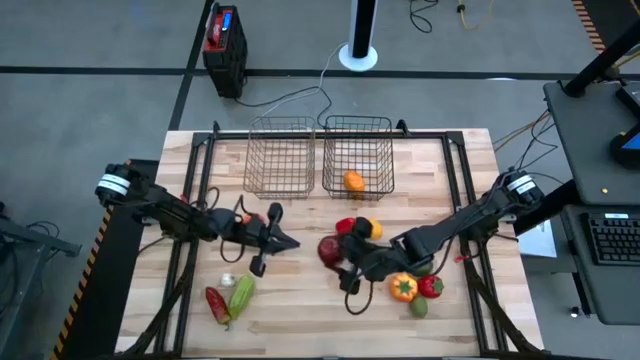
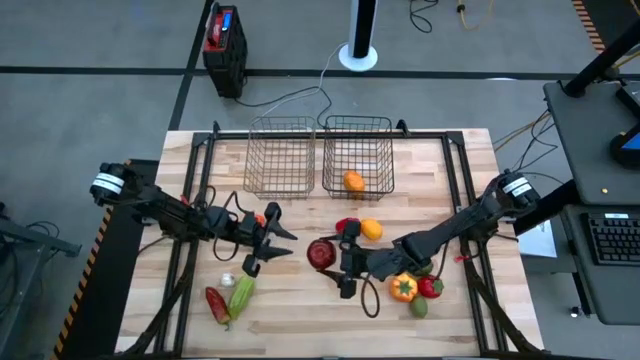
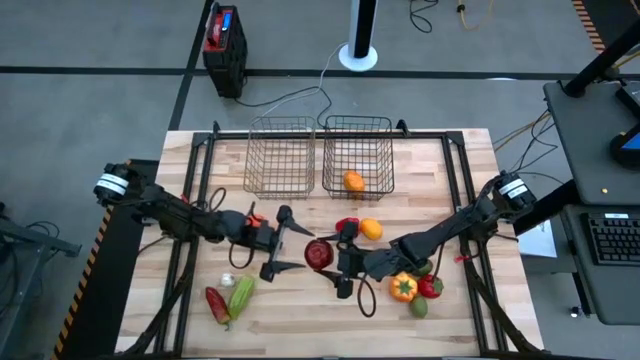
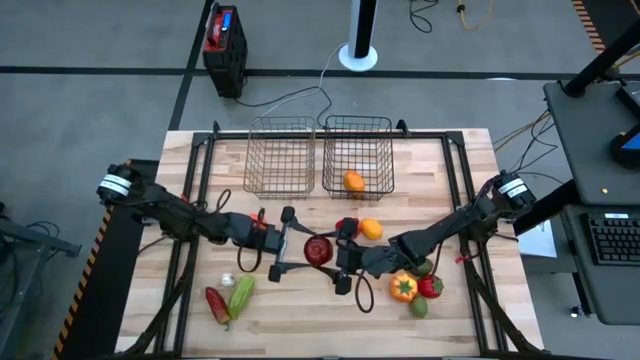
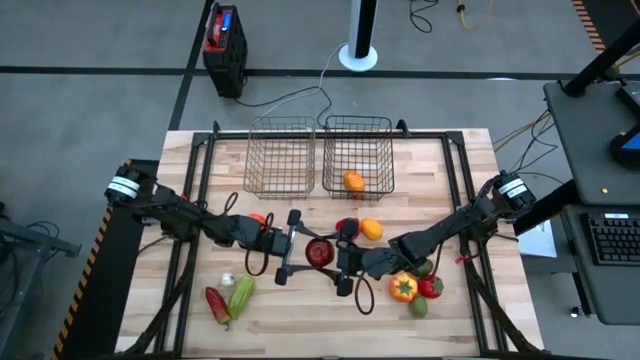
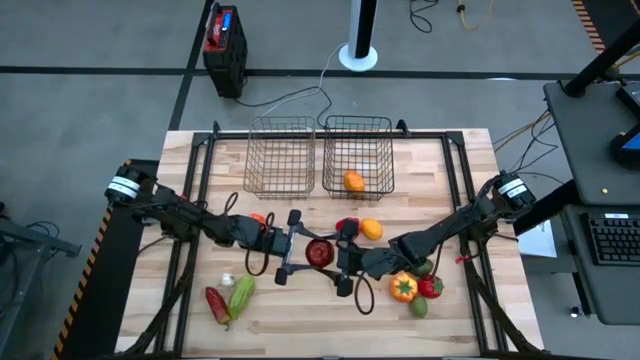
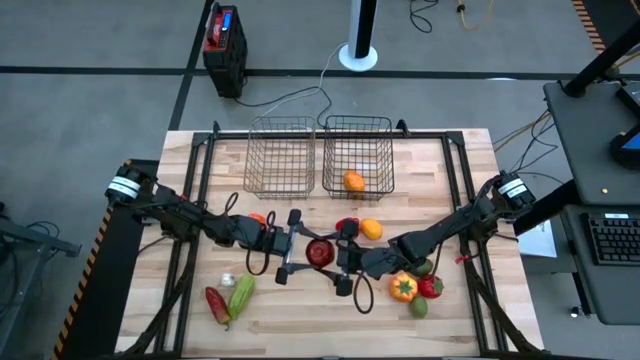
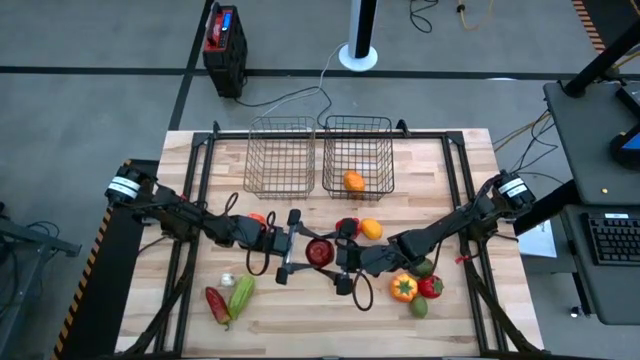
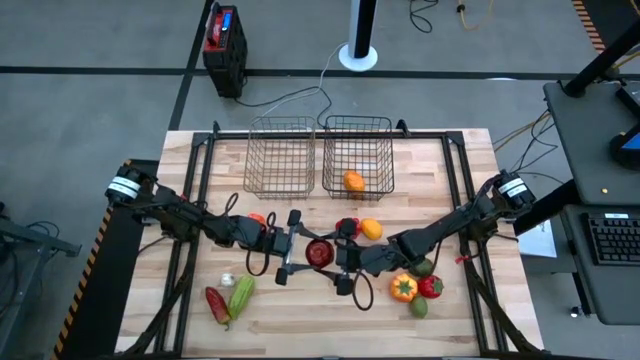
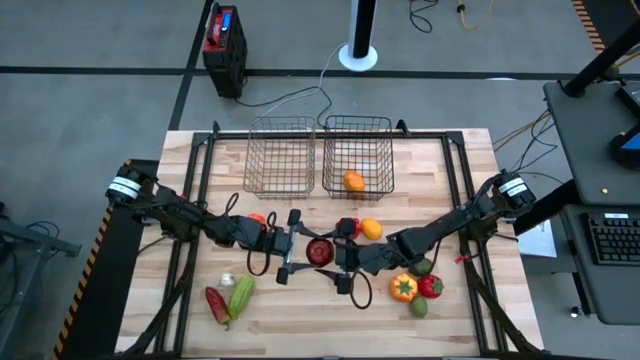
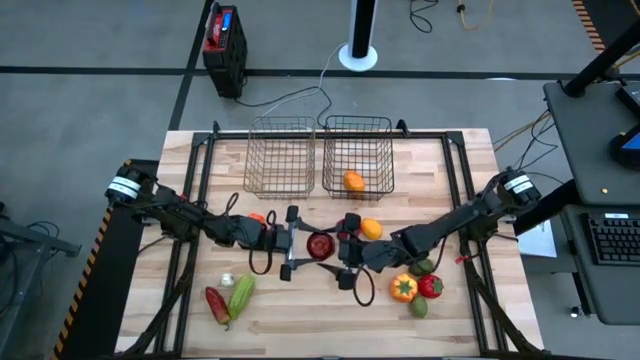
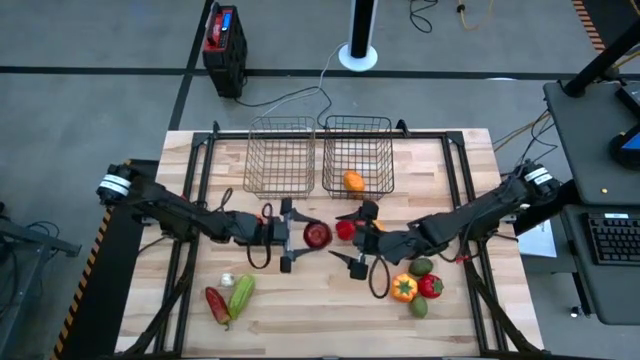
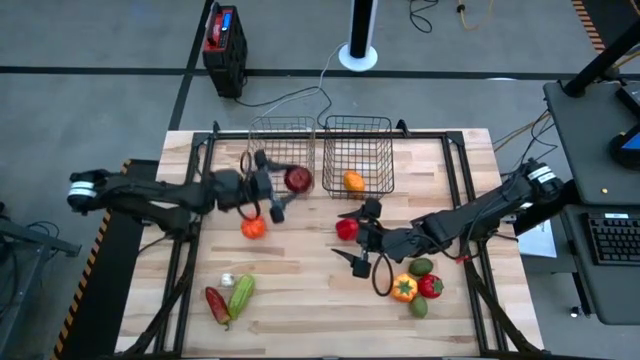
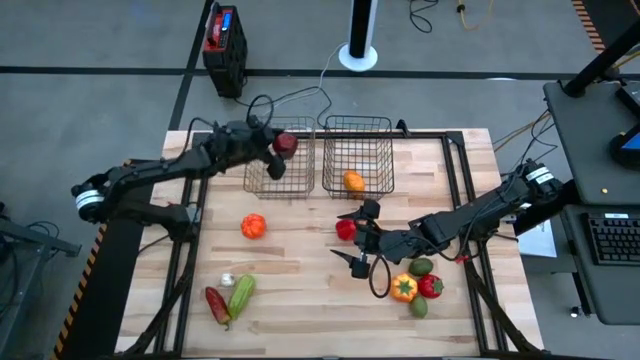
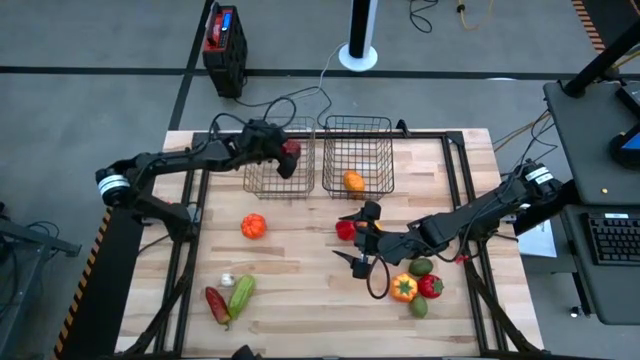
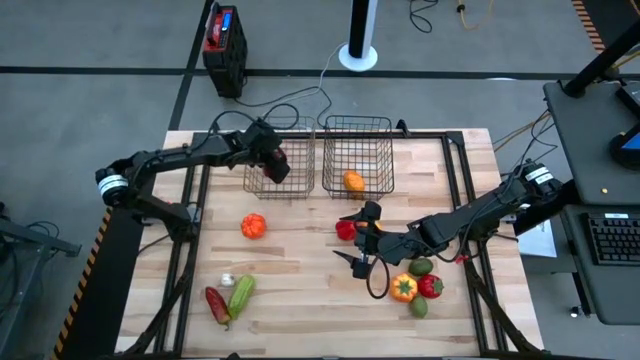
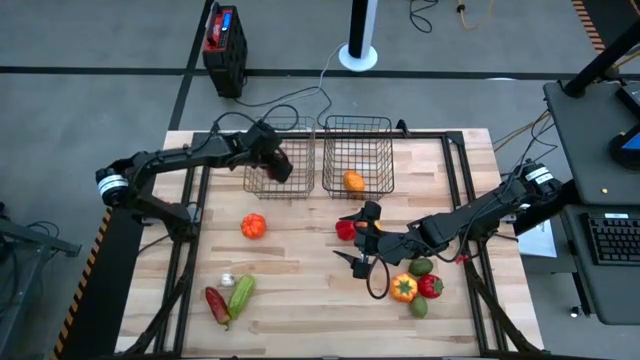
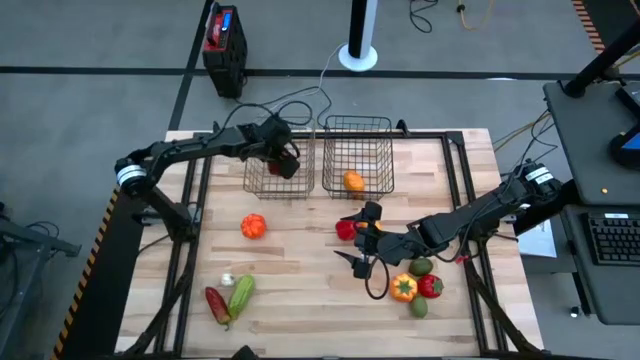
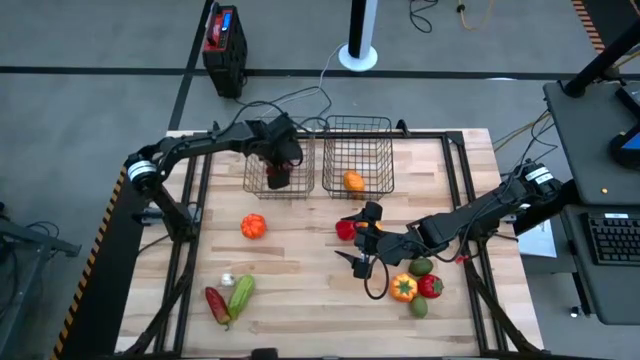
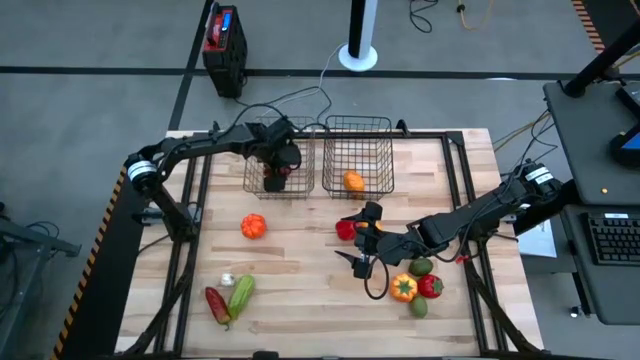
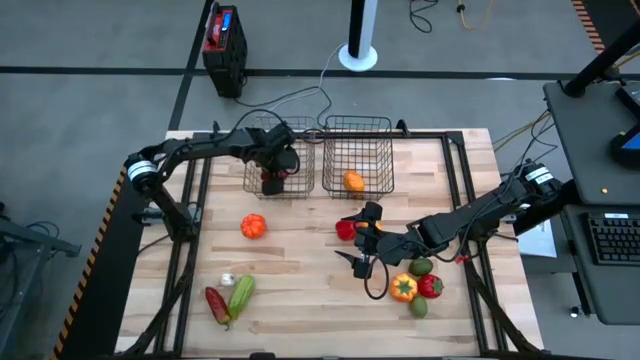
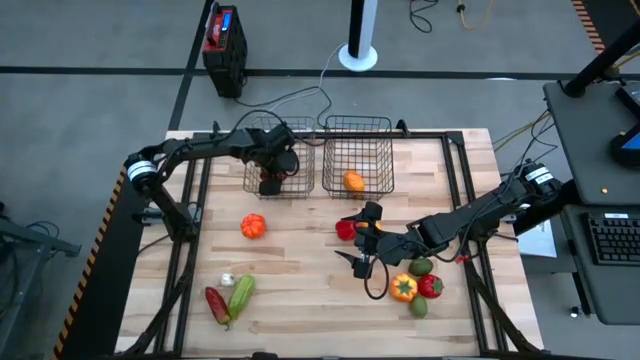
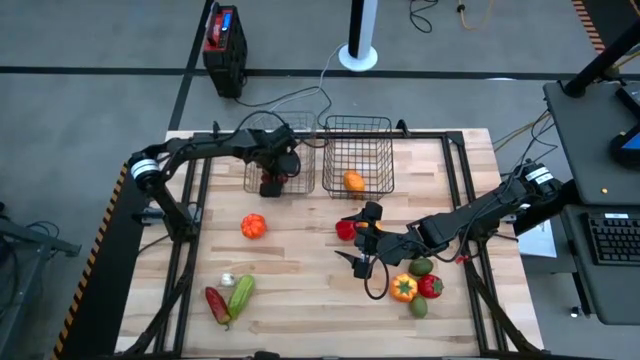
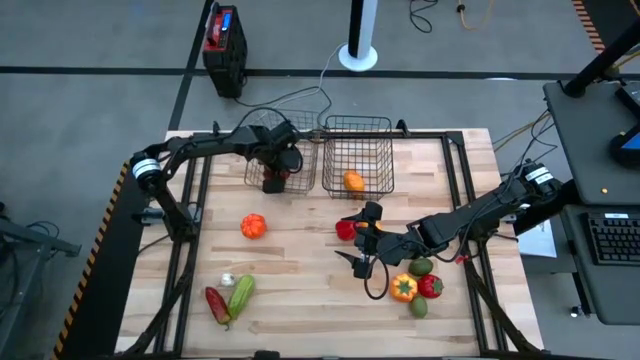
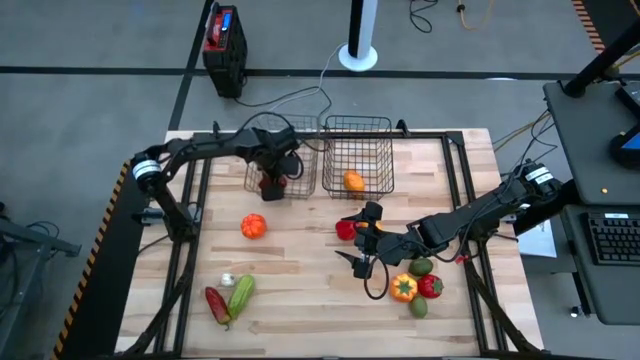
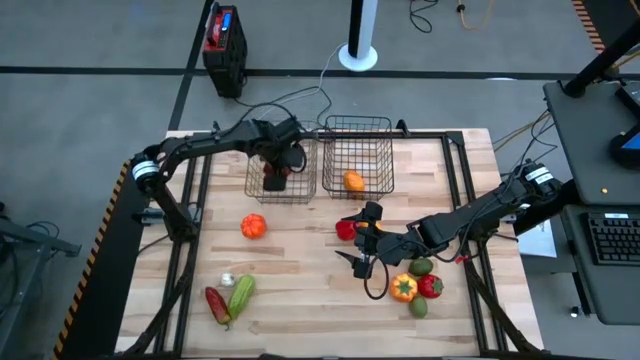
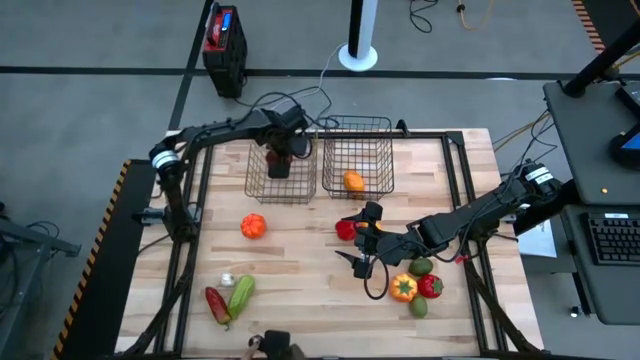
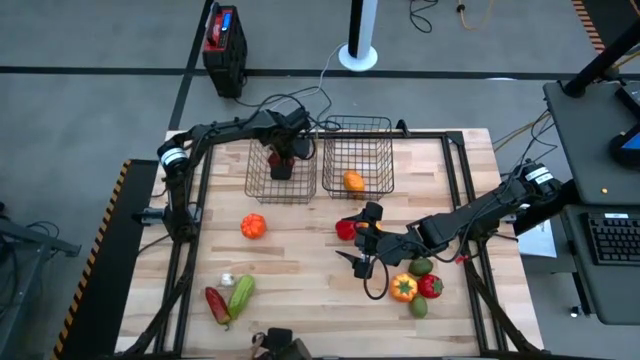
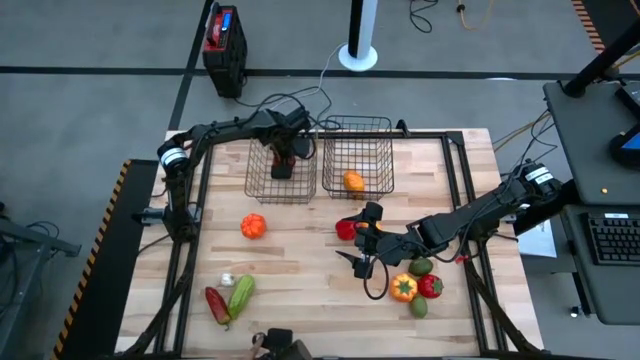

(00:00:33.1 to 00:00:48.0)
Task: Sort produce into baskets
Put the red apple into the silver wire basket

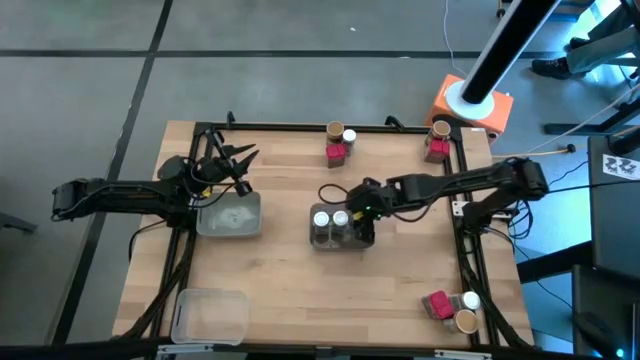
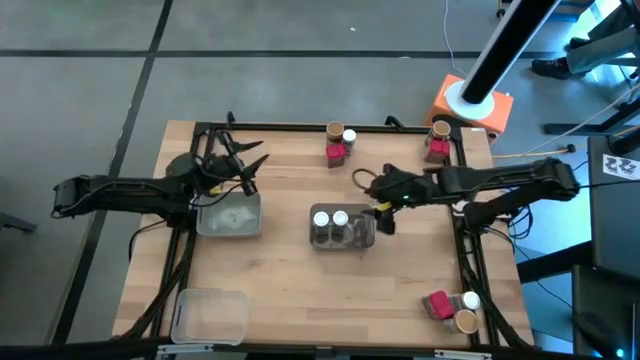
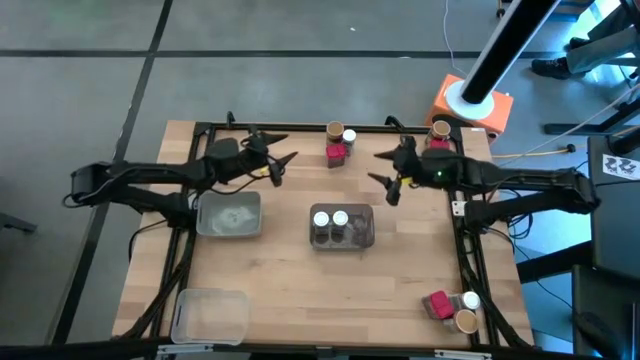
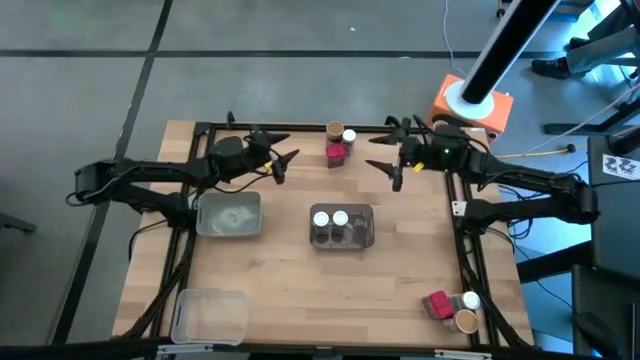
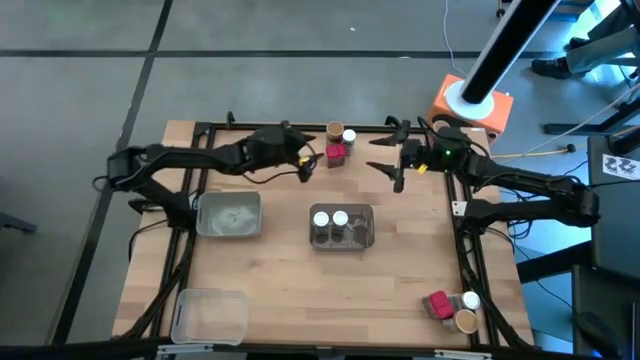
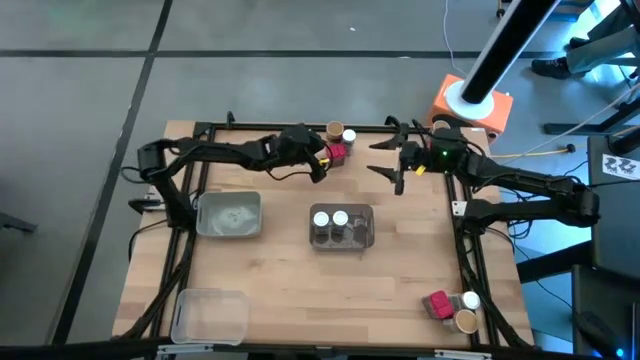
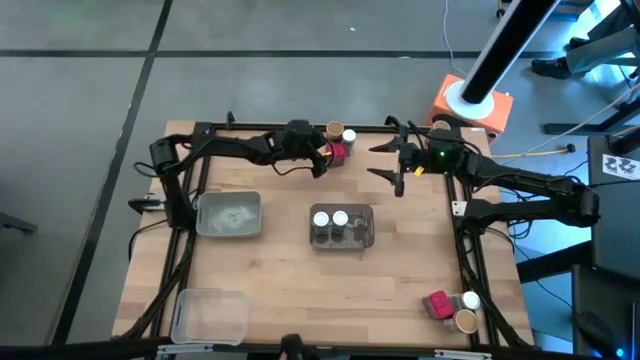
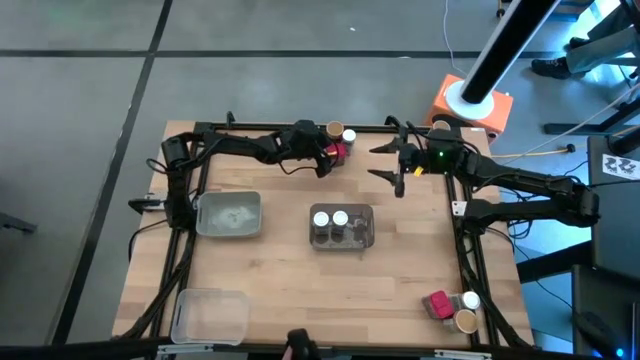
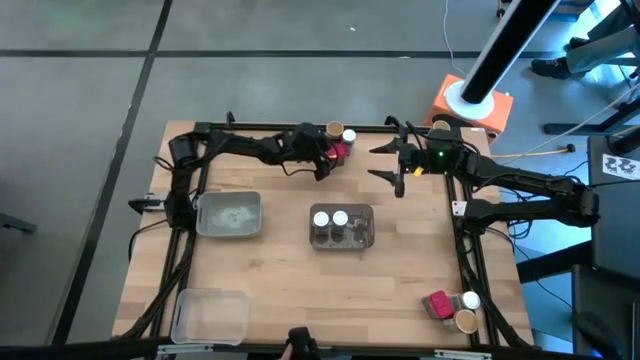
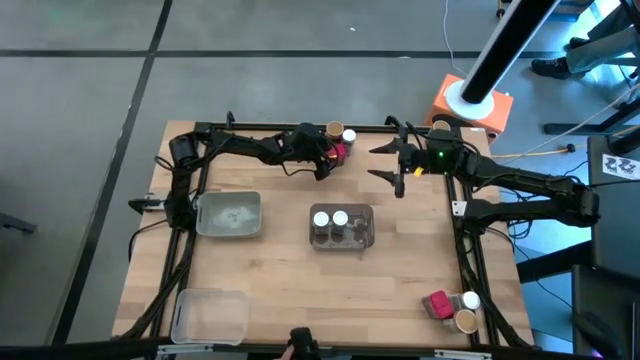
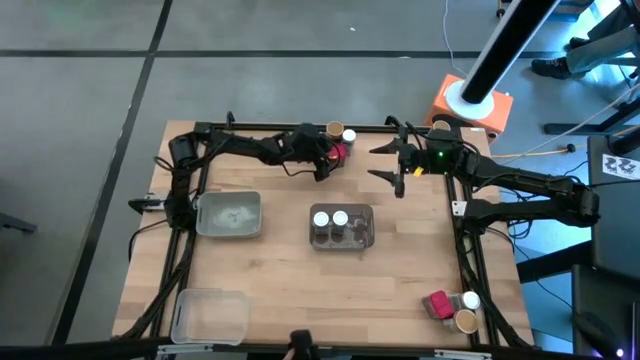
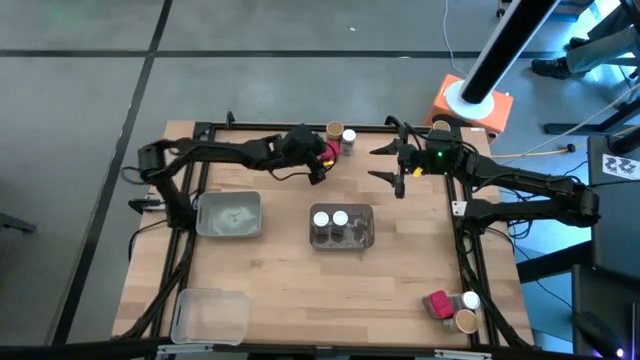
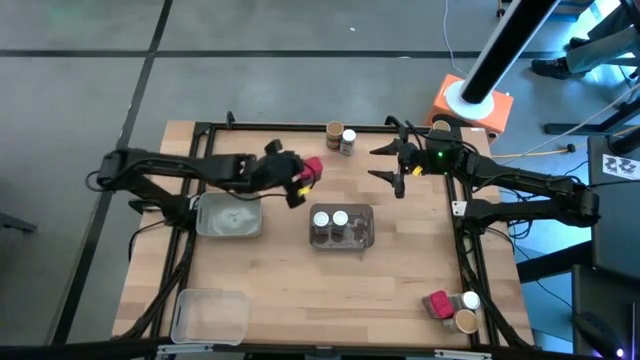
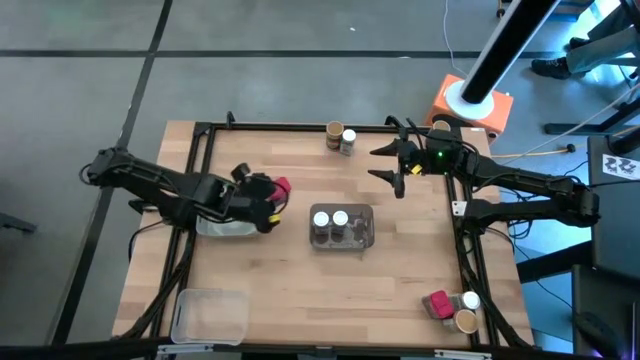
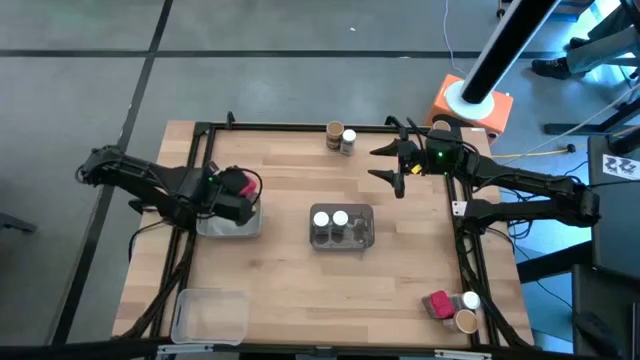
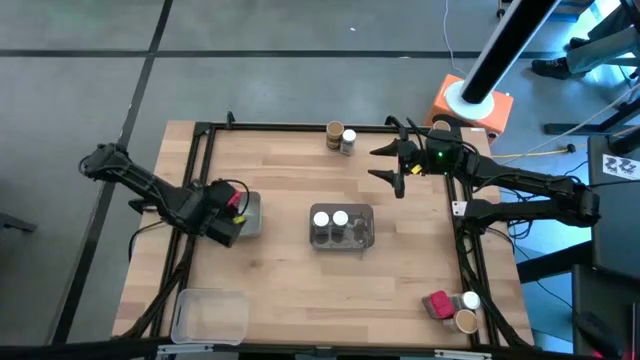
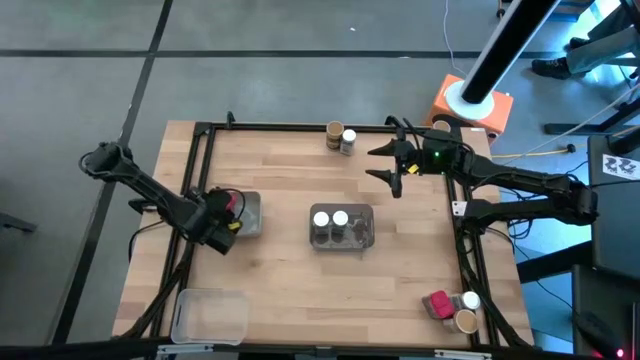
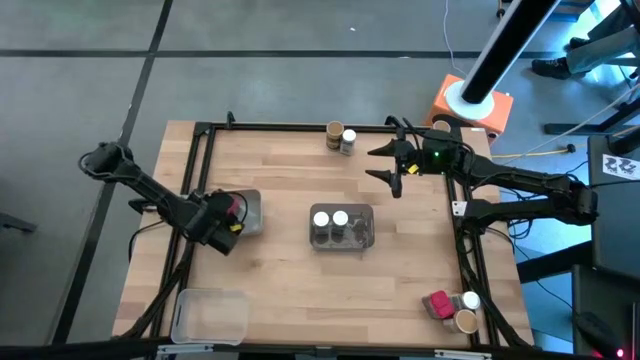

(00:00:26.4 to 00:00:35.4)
Task: Sort spices by type
Put the top left red seasoning can into the gray bin
